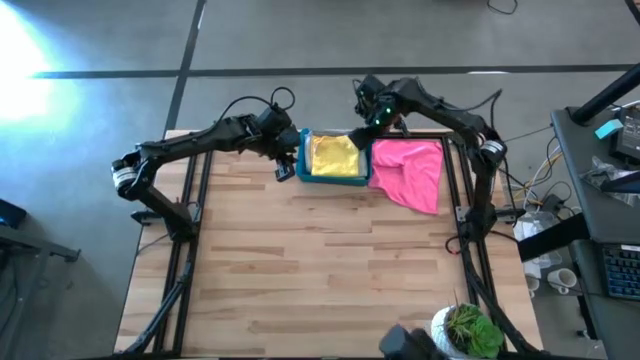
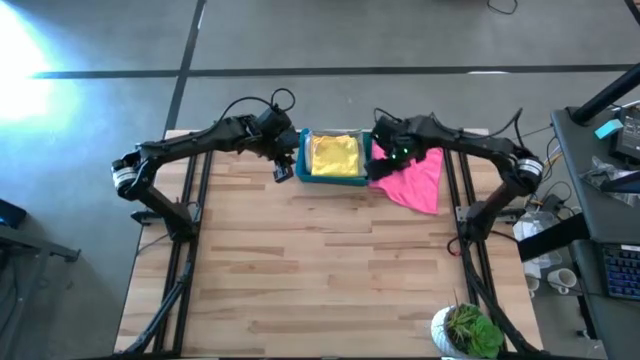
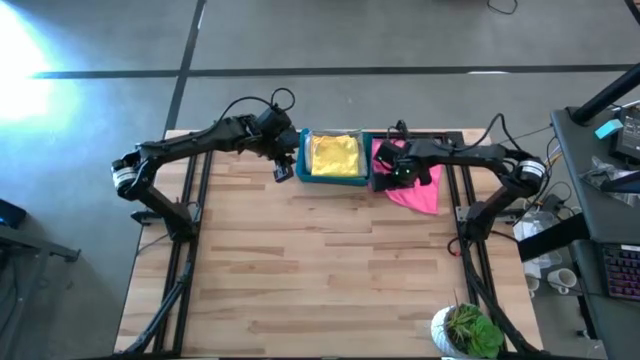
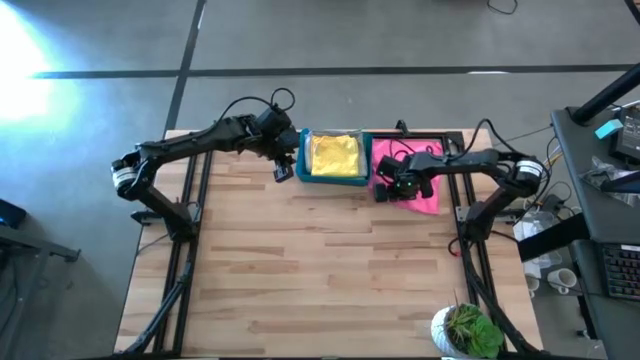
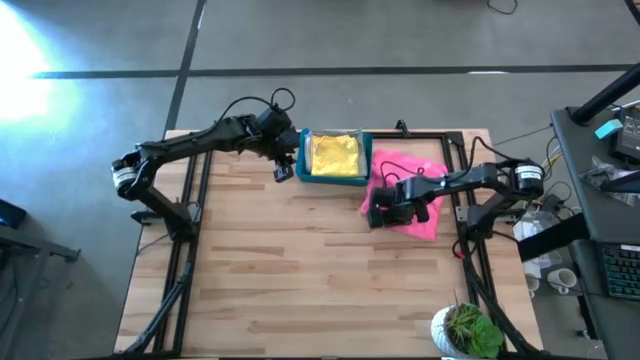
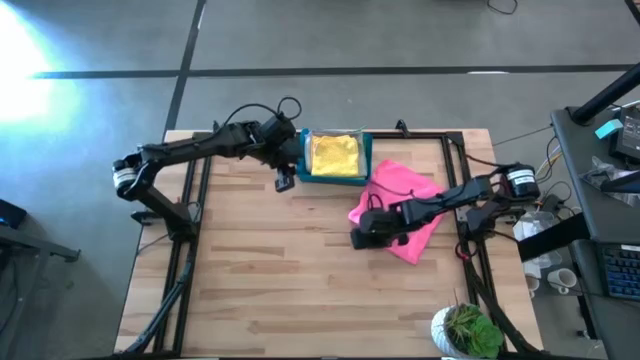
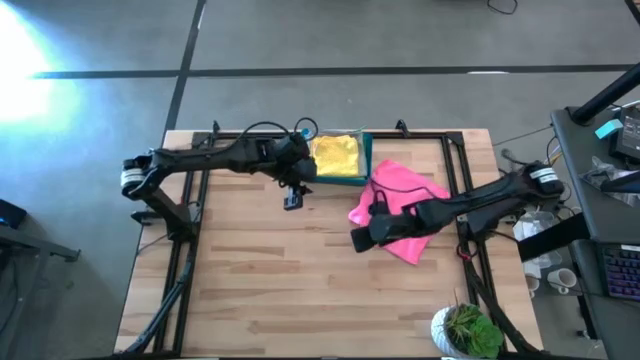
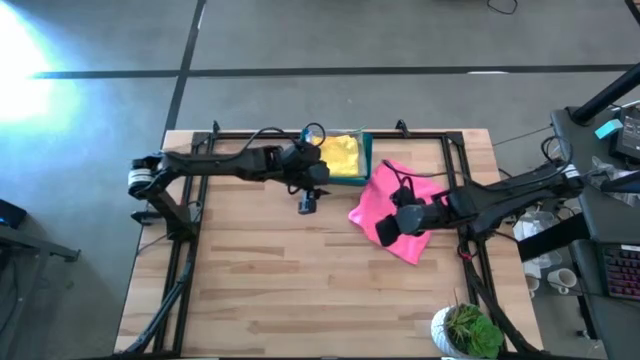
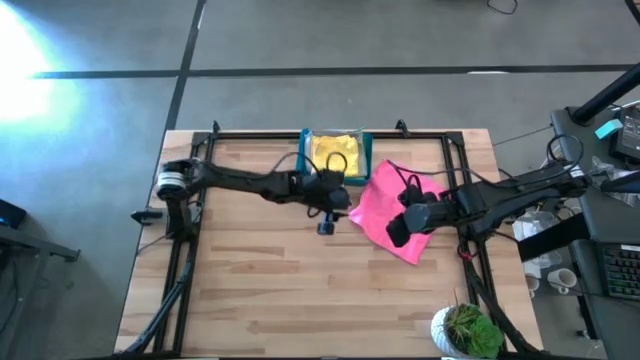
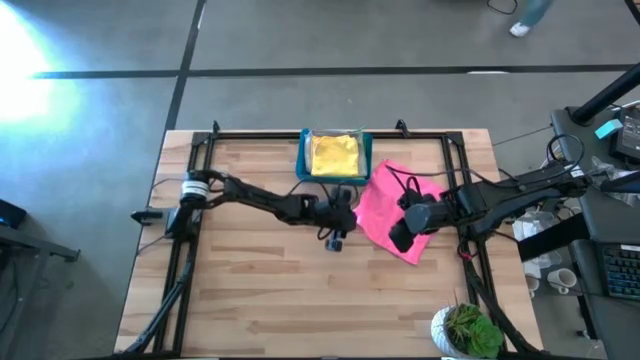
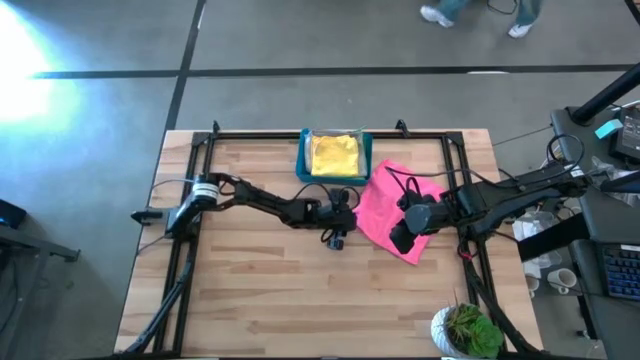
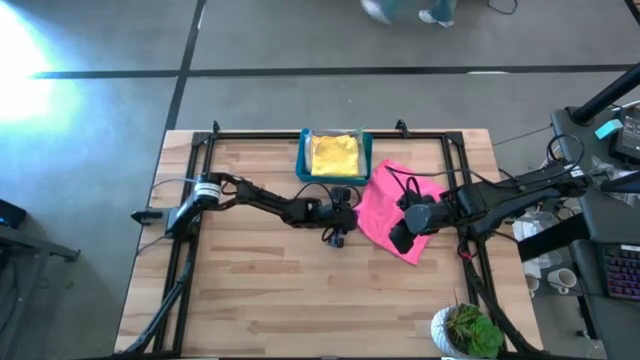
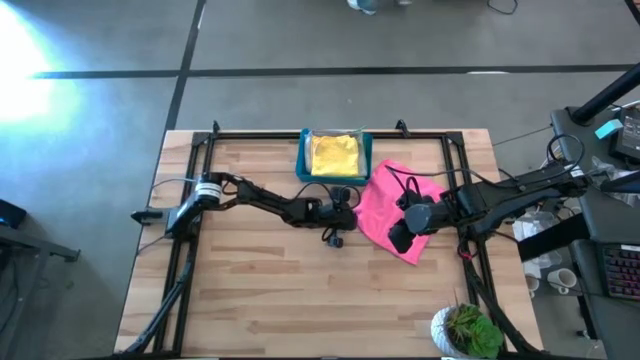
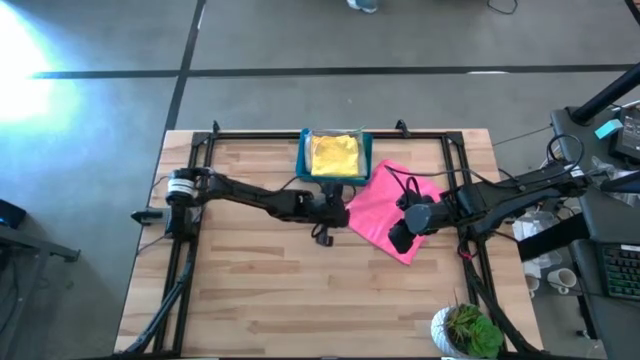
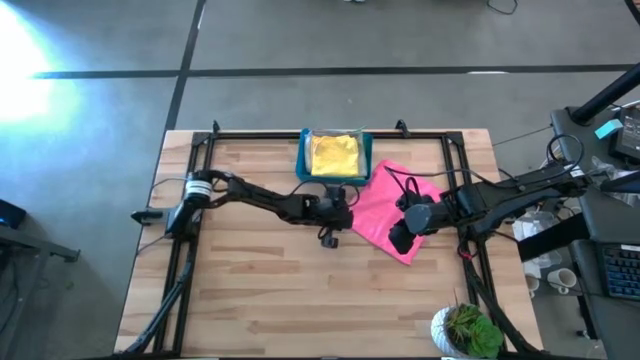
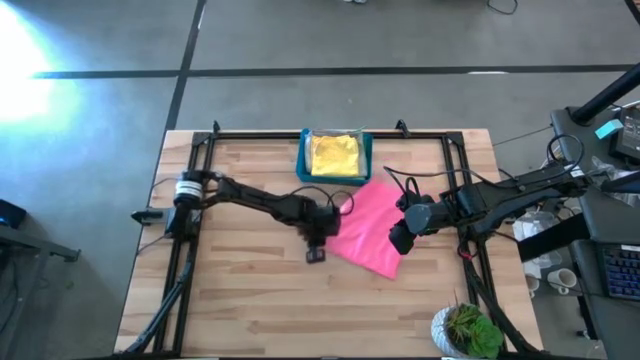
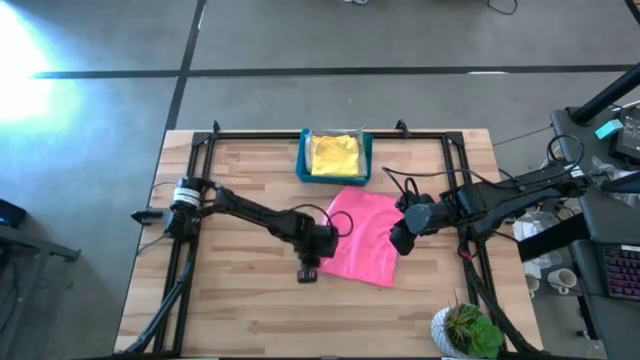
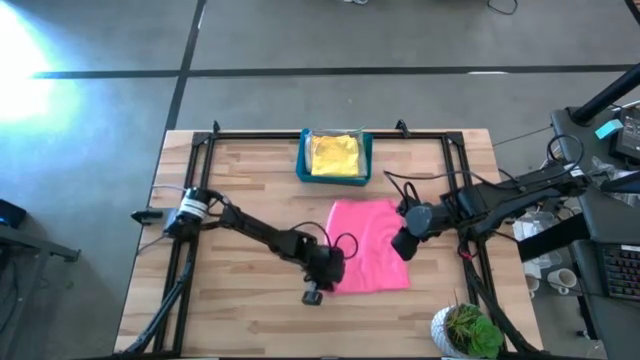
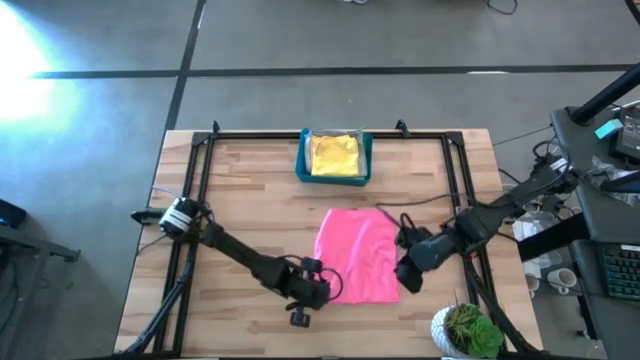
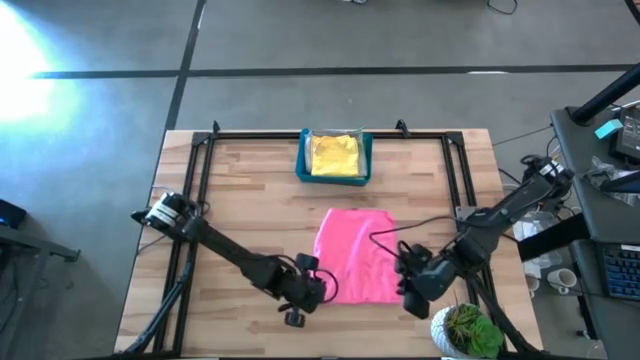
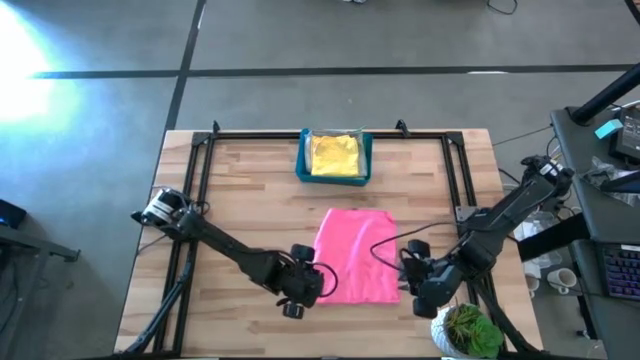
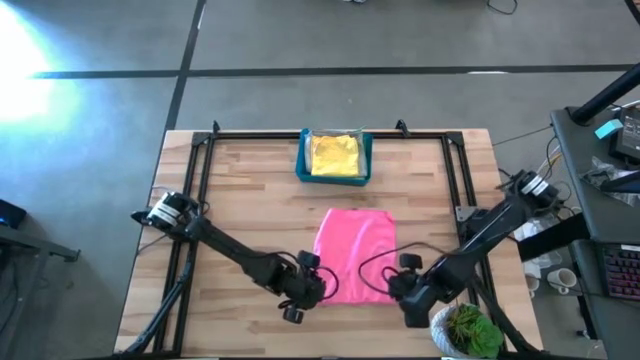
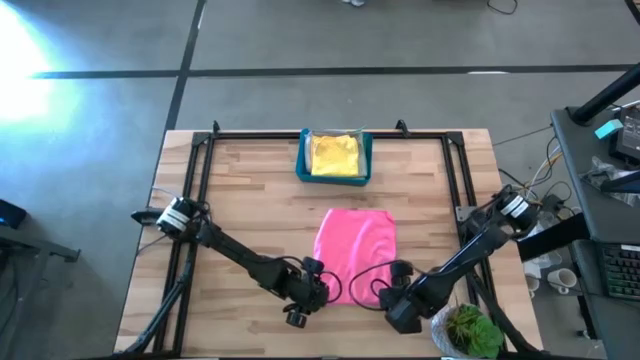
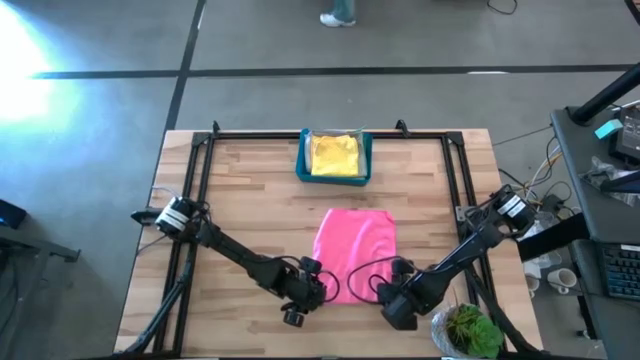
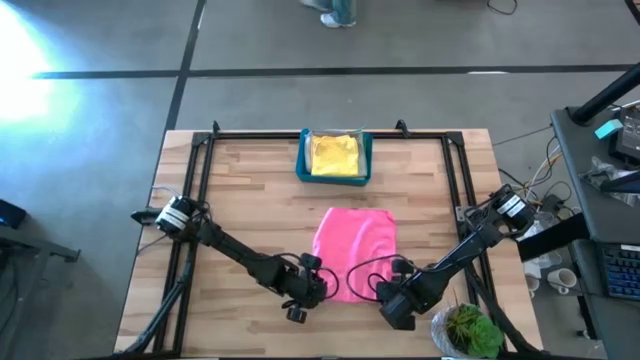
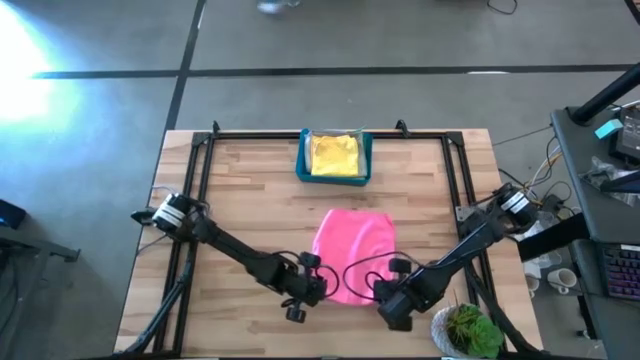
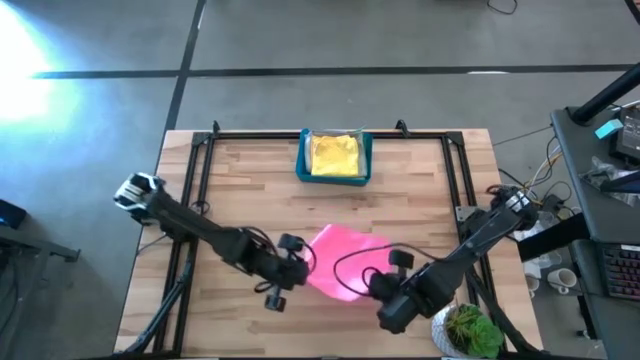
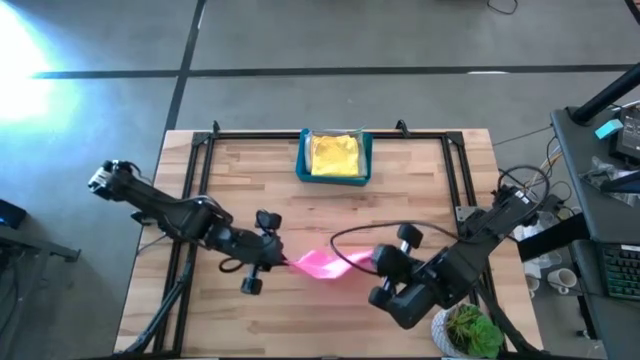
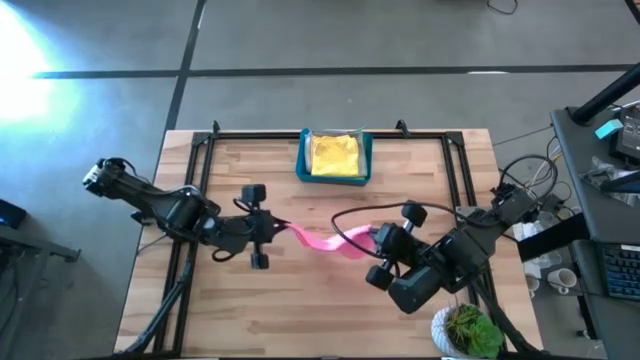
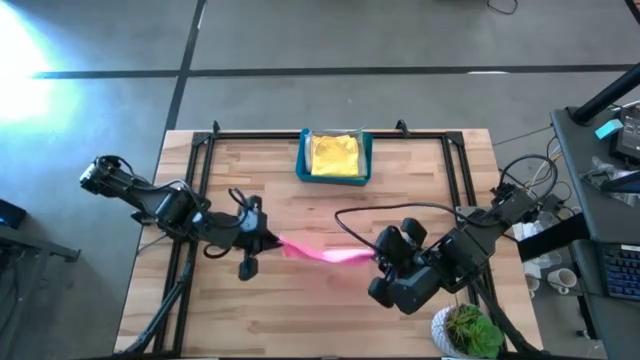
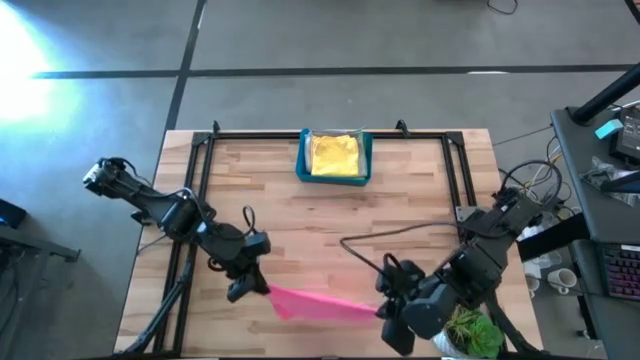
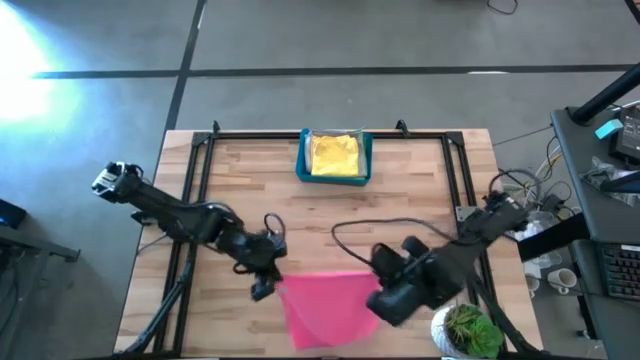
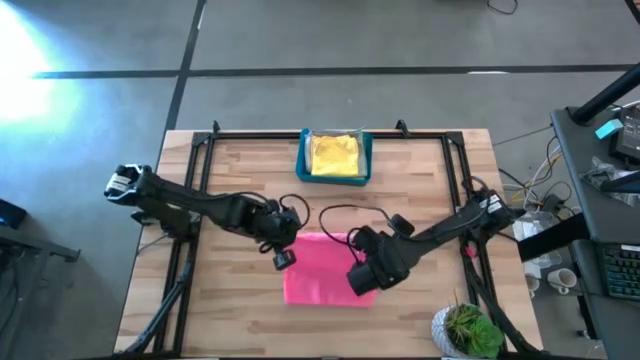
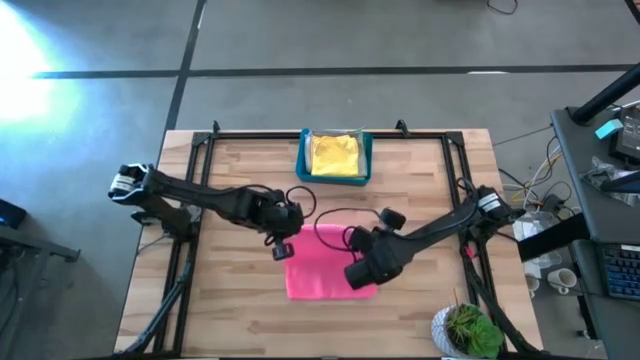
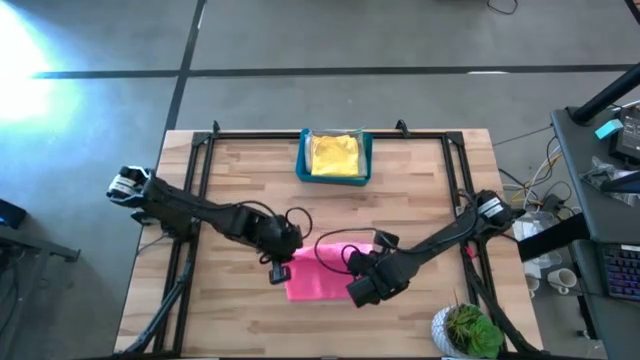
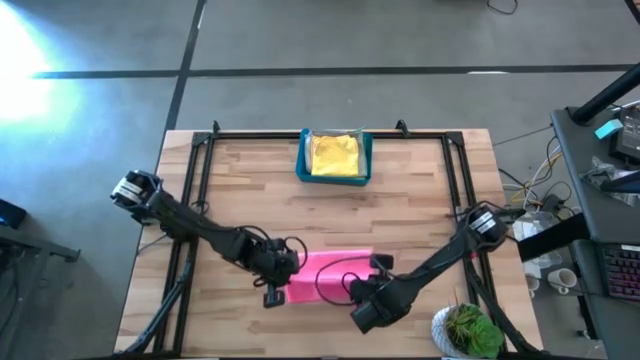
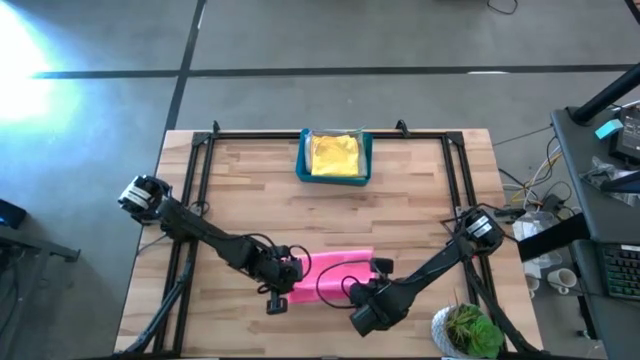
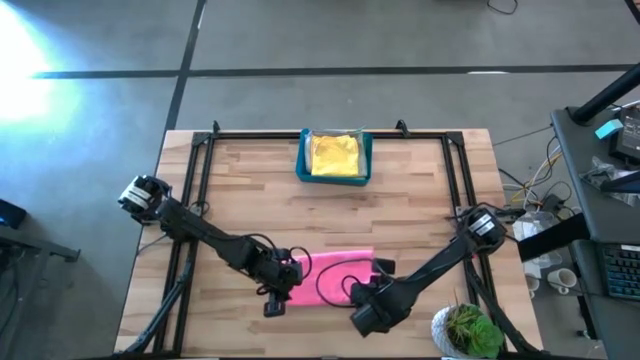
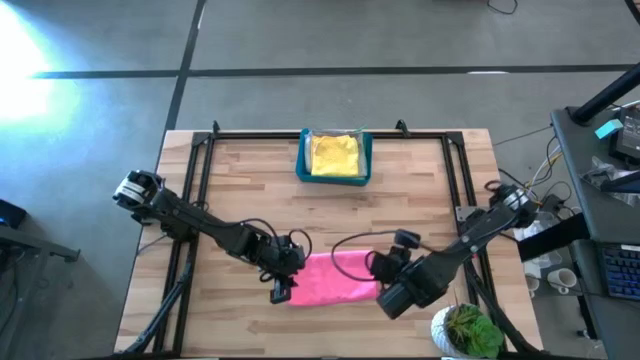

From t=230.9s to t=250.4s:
Task: Fold microfiber towels
Fold the pink microfiber cloth

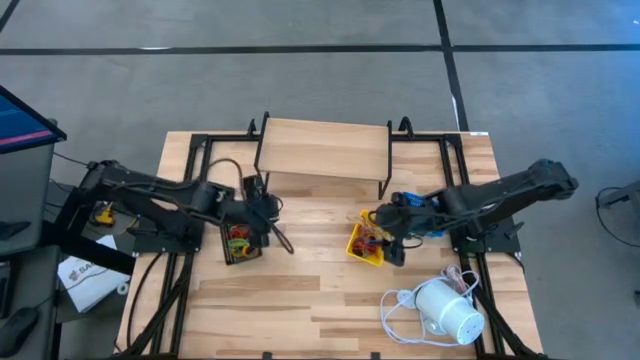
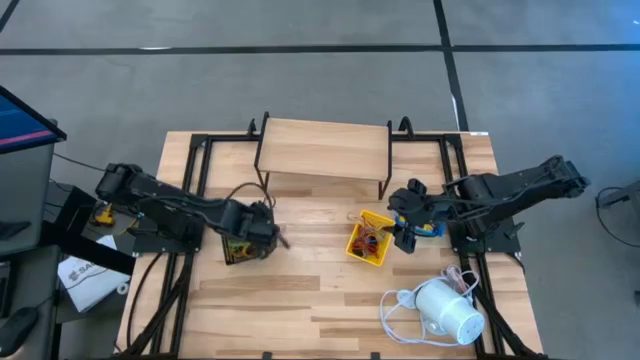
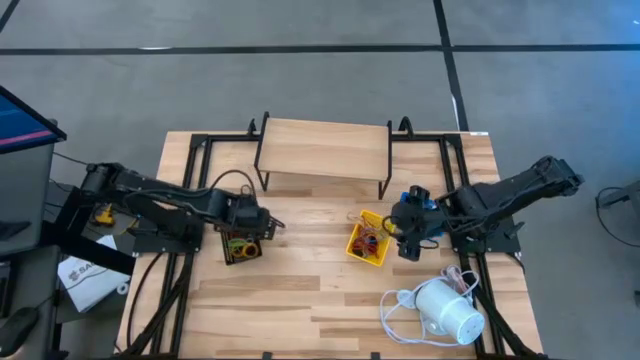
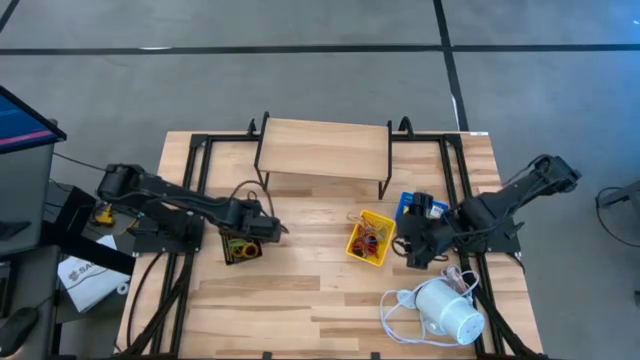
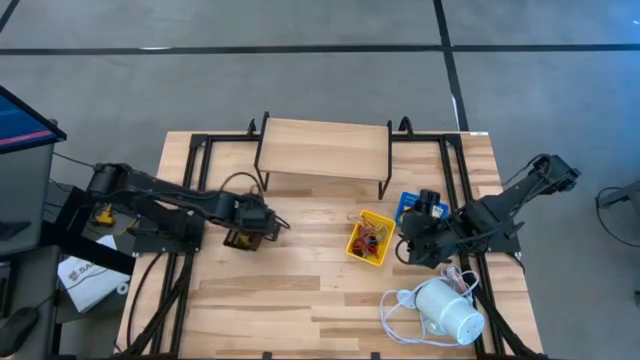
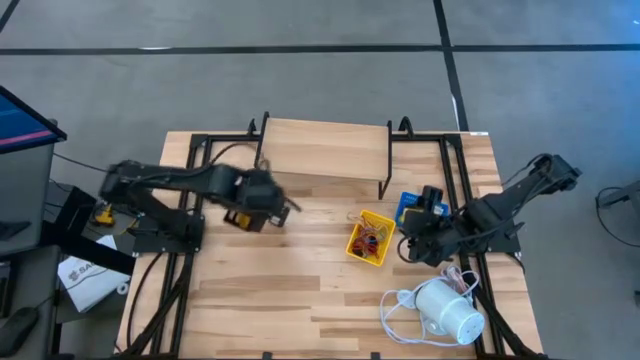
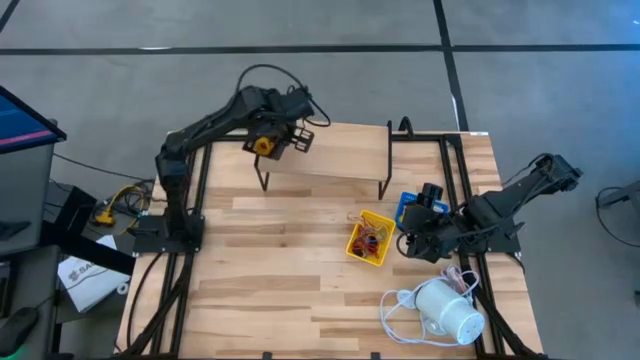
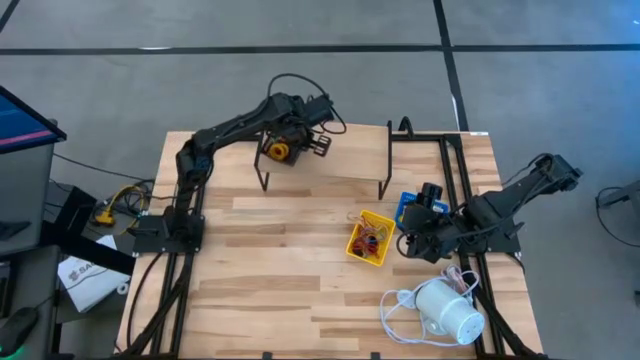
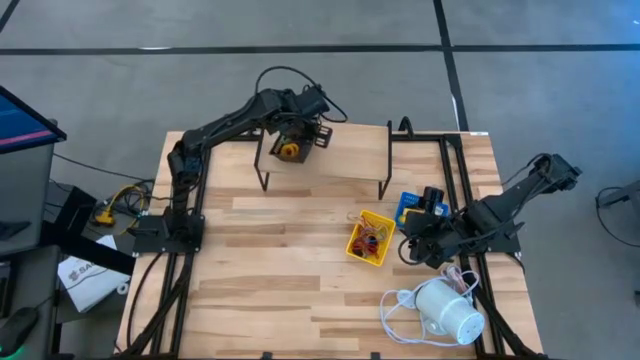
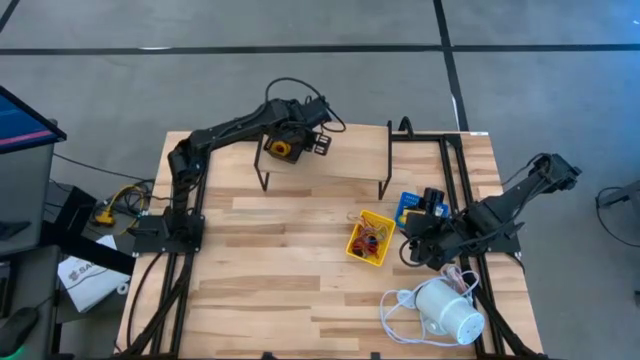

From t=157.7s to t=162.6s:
Task: Pick & Place Office Desk Supplies
Put the black bin on the shelf
